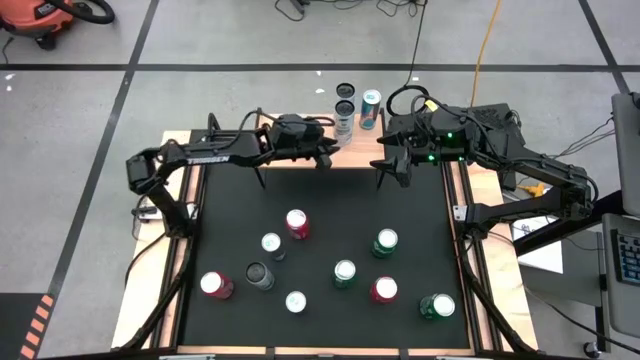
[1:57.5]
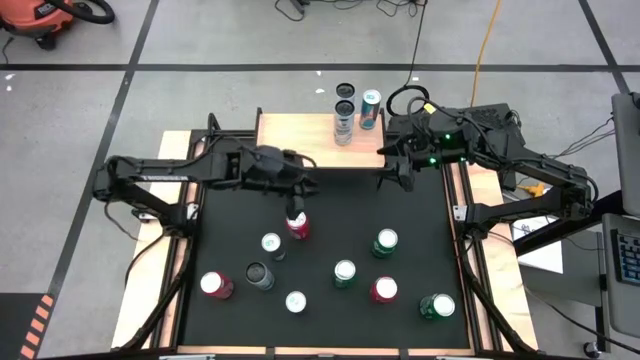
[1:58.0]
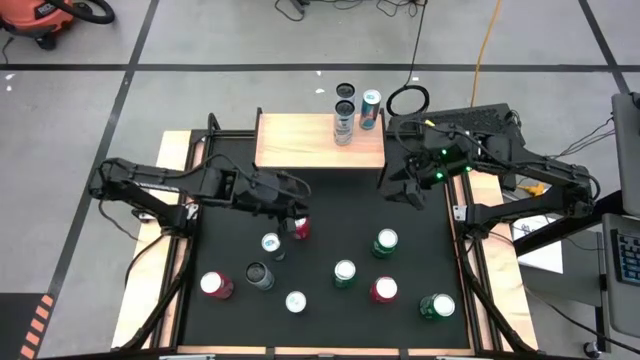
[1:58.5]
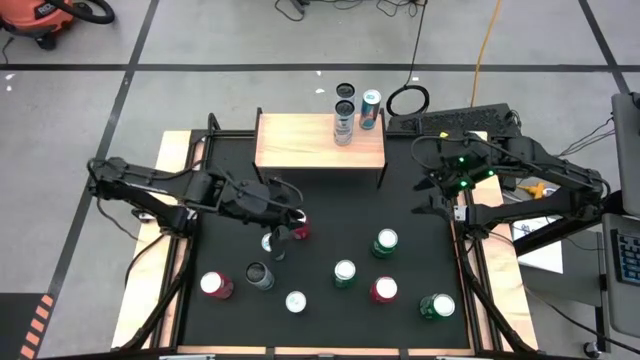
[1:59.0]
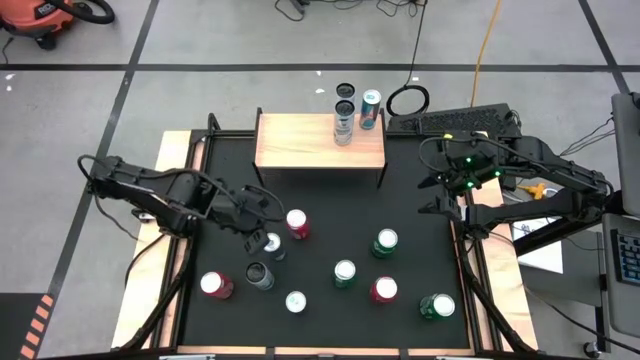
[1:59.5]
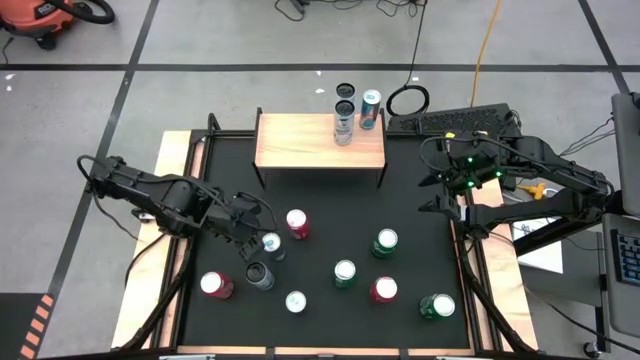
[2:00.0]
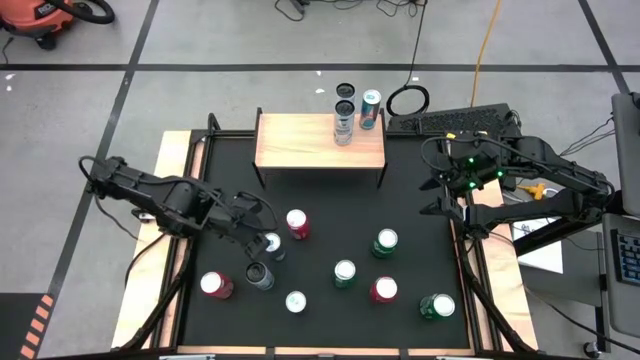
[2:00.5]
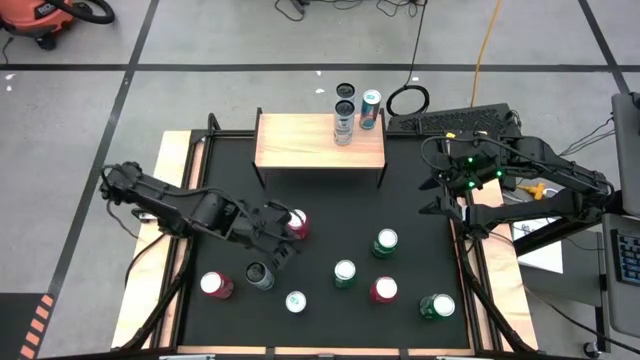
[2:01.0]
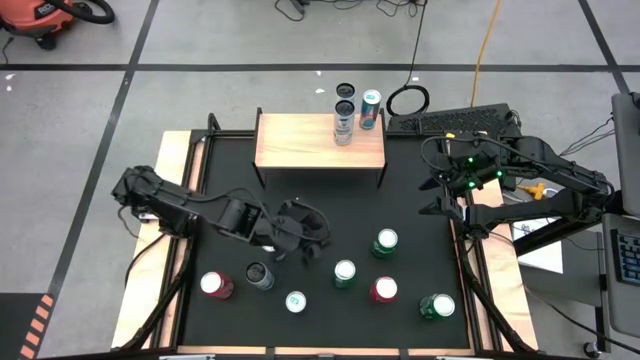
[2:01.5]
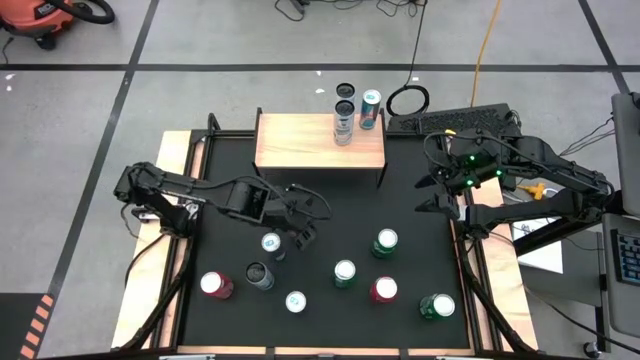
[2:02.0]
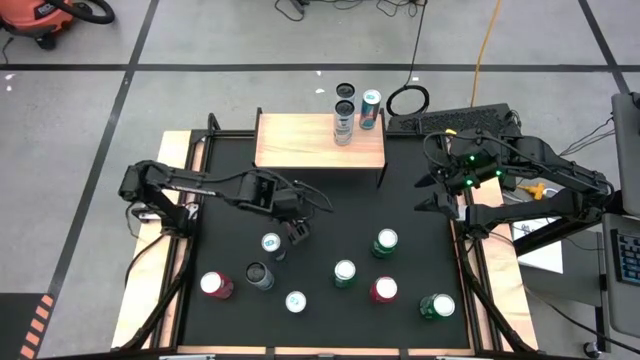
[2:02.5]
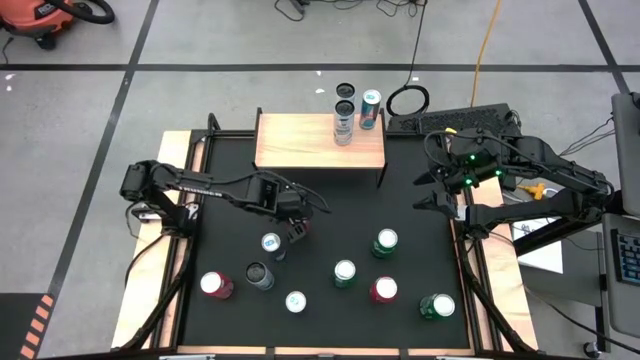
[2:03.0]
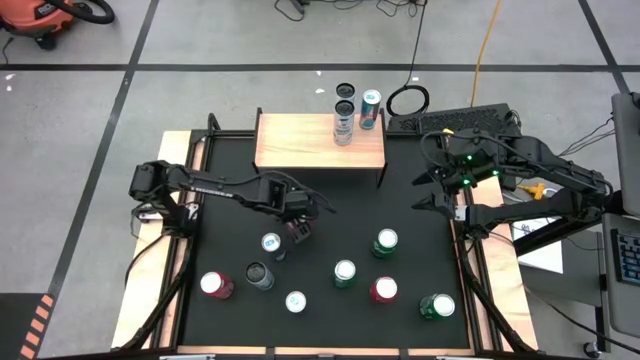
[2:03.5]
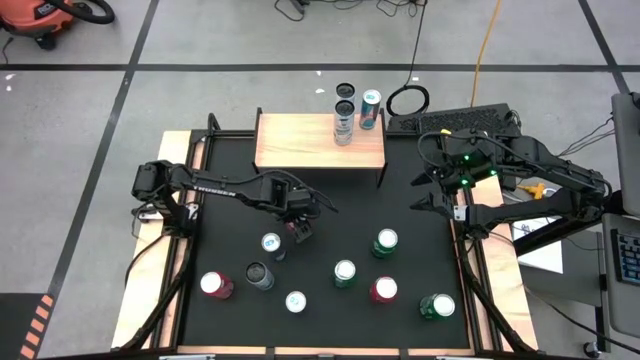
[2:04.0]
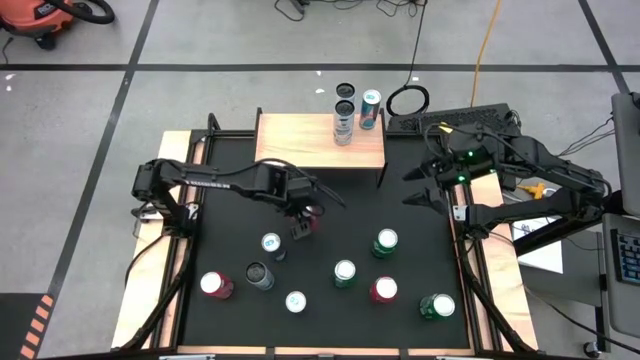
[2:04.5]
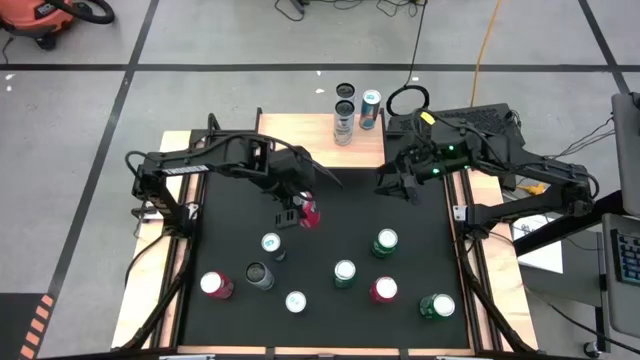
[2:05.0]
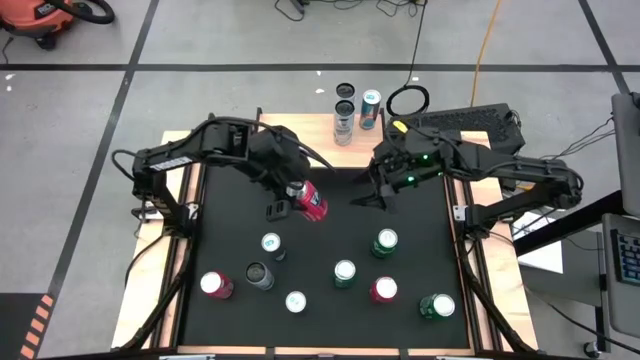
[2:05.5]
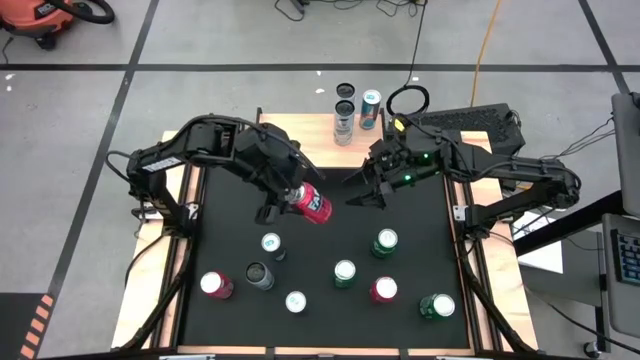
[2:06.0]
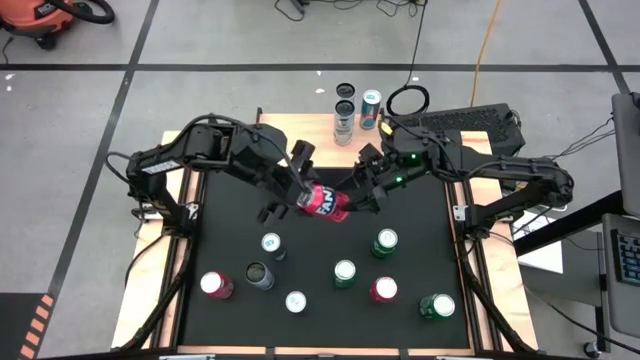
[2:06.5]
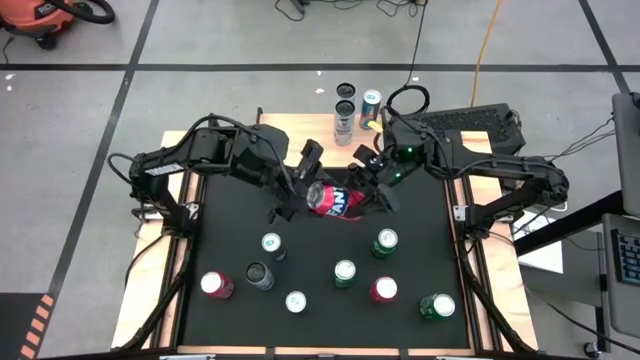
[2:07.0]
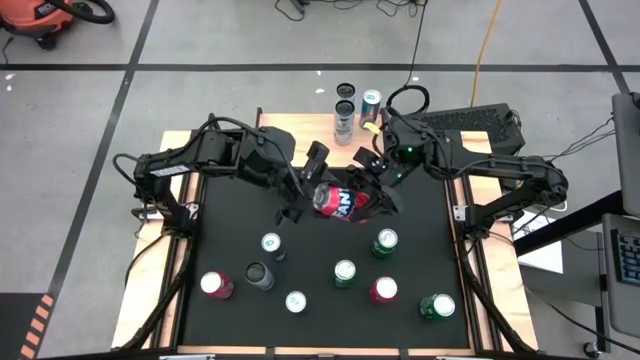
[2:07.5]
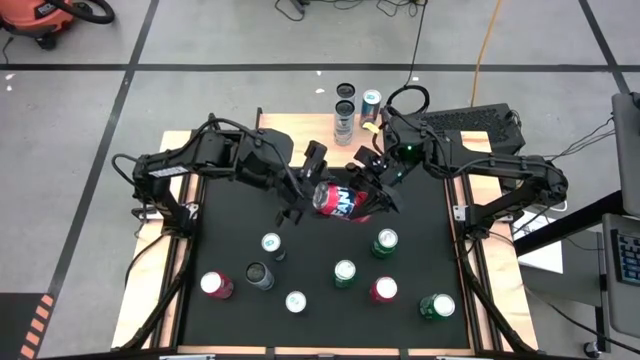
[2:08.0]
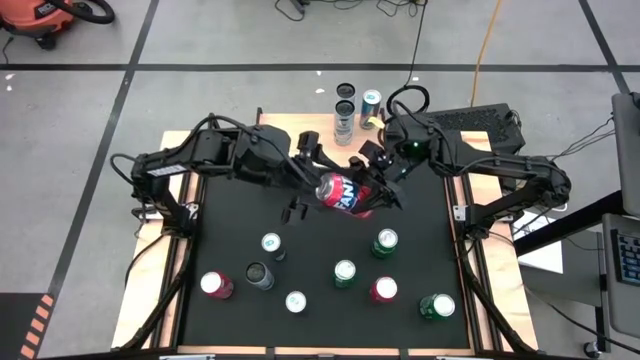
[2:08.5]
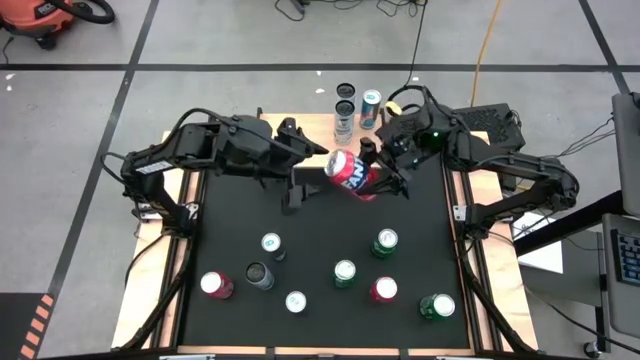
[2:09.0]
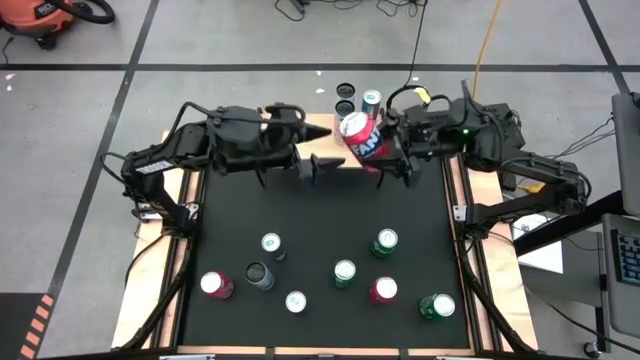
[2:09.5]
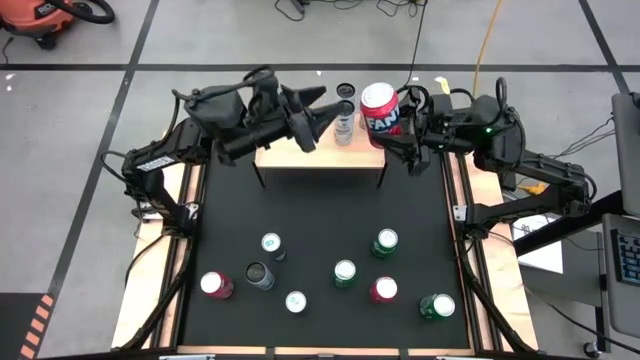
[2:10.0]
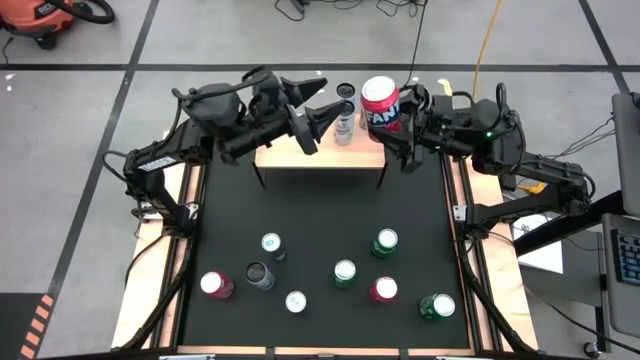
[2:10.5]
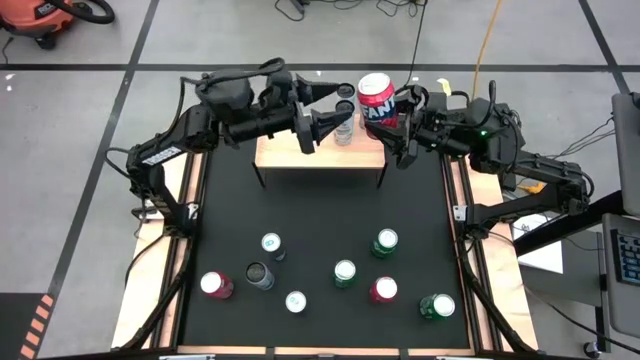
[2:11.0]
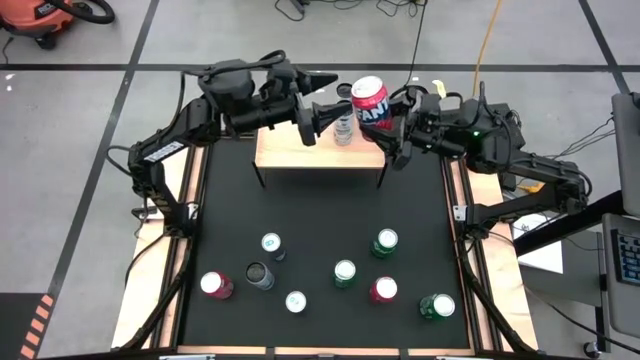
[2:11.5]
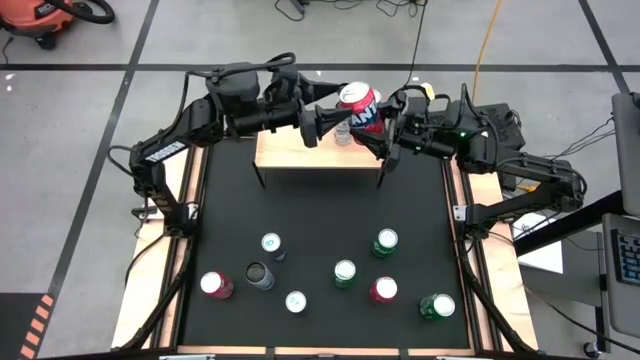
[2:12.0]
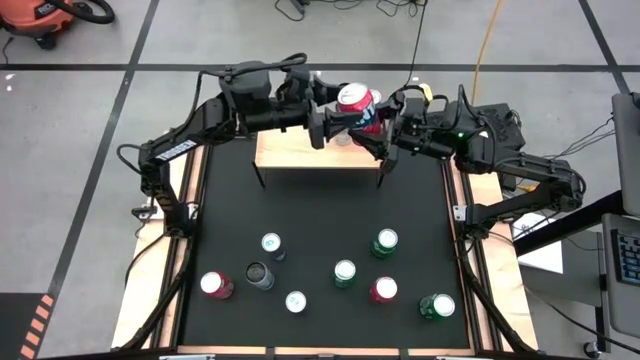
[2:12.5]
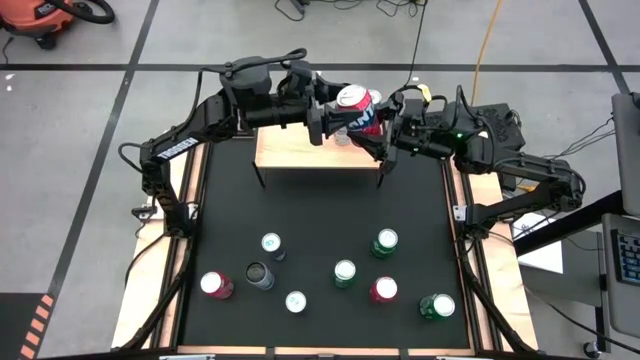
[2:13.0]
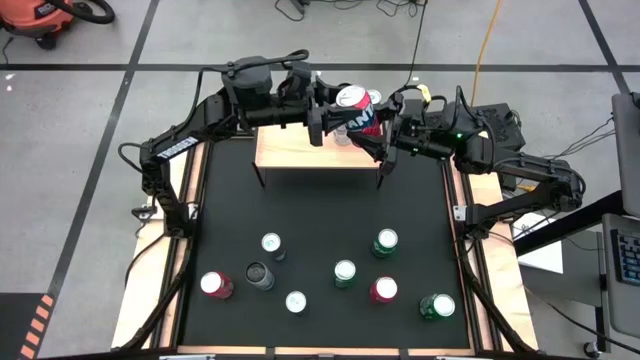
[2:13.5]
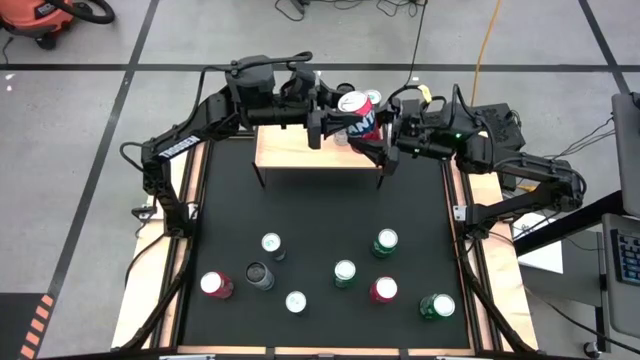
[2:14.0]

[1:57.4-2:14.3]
Task: Place canned beverage on shelf
Put the top center orange soda can on the shelf

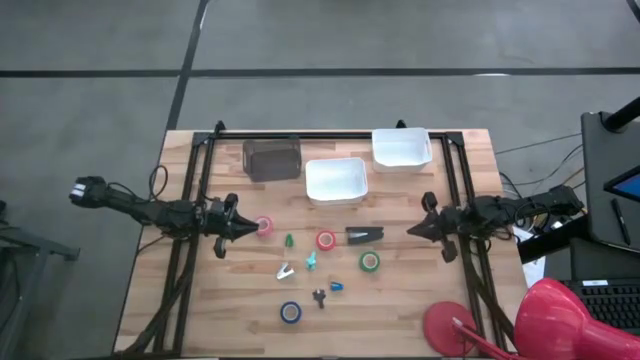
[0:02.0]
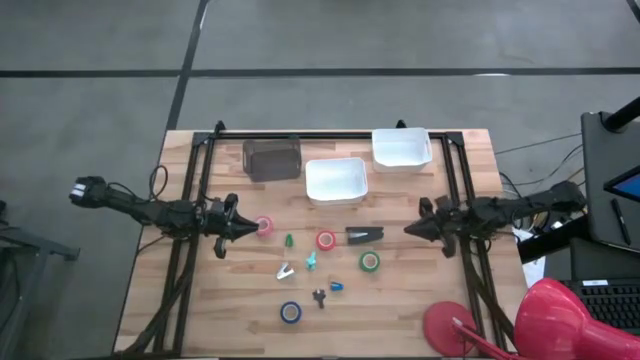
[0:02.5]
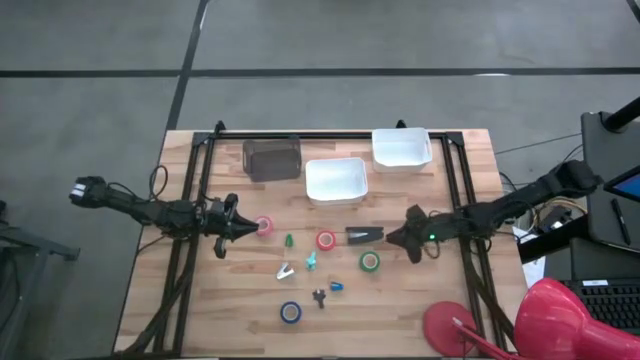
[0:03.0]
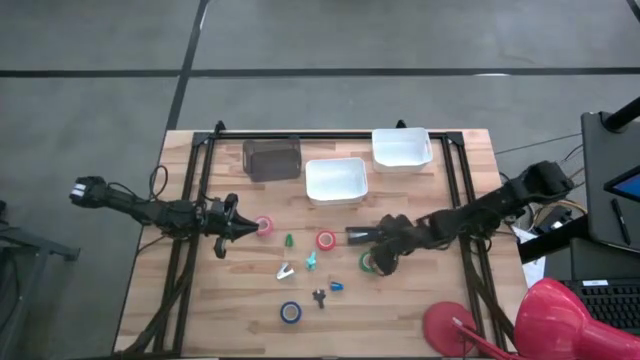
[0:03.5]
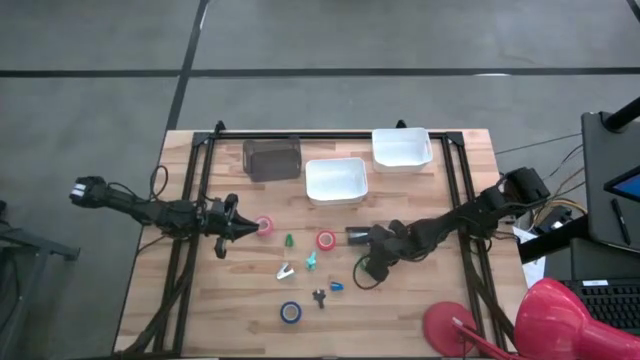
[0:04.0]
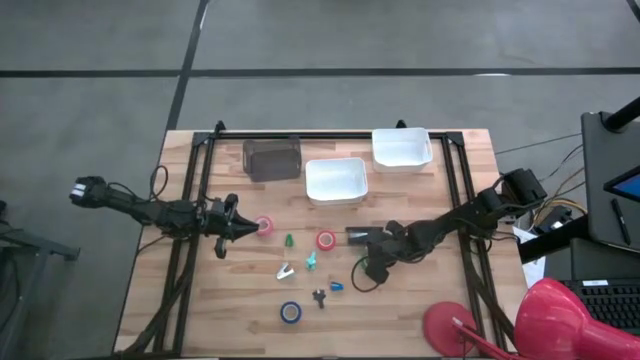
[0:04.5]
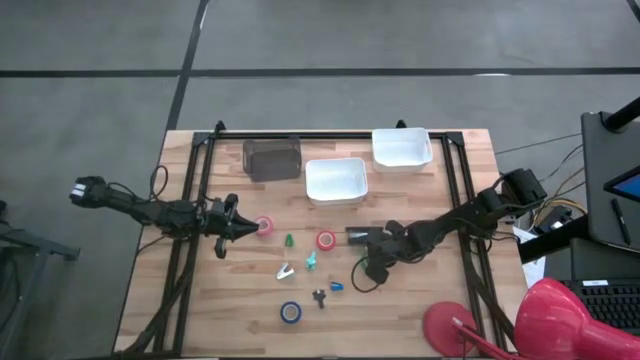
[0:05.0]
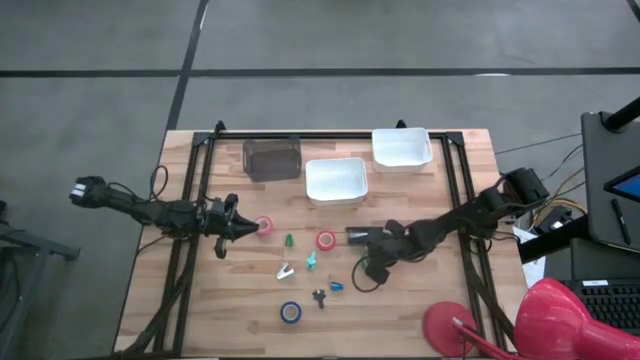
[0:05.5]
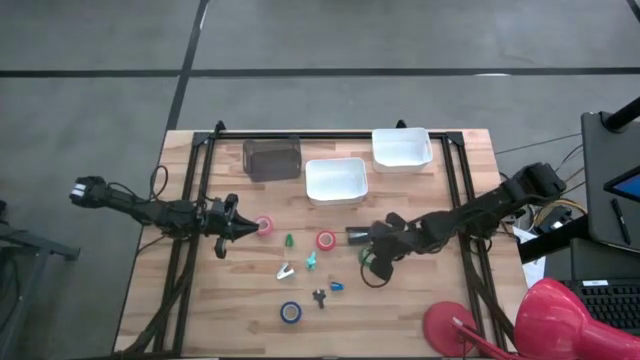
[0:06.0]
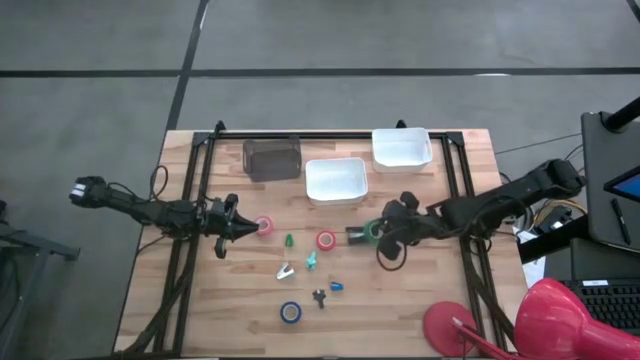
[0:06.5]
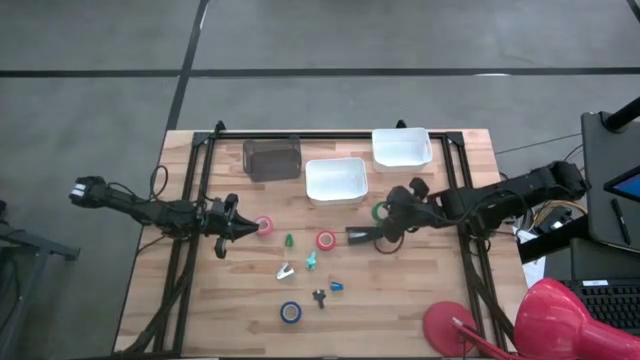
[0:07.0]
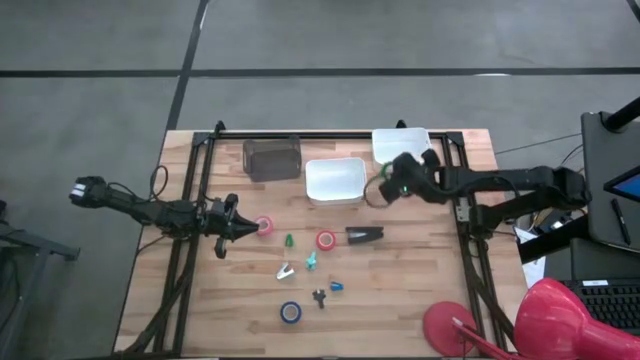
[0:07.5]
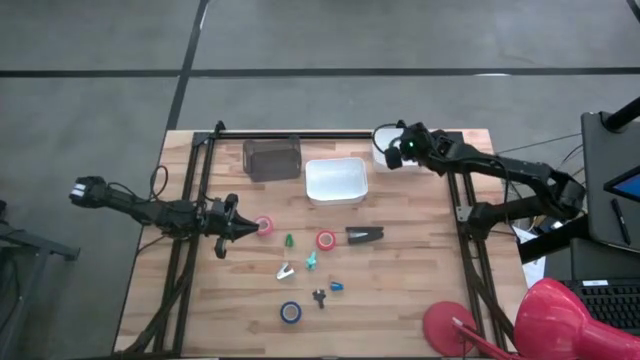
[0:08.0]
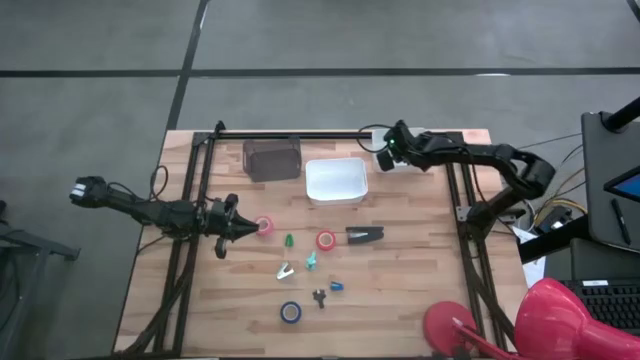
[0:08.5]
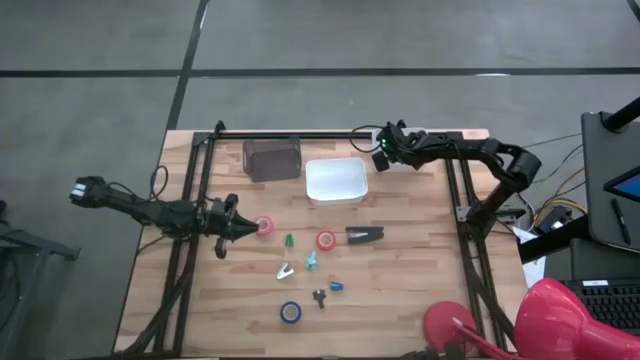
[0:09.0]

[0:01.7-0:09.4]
Task: Pick and place Stapler, Stapler remover, tape
Put the green tape into the right white bin
